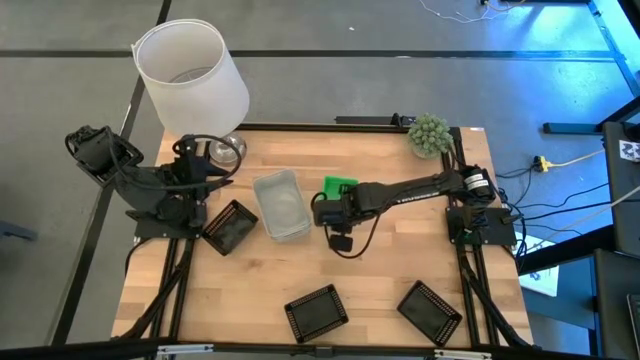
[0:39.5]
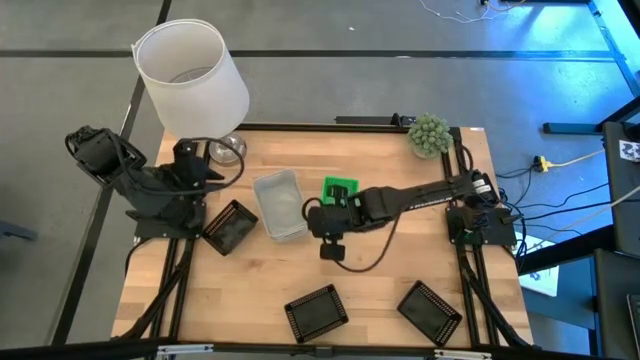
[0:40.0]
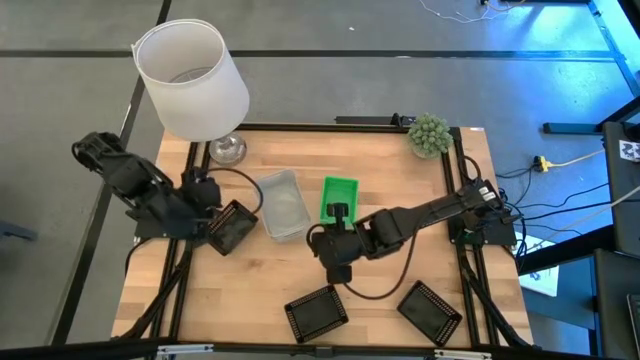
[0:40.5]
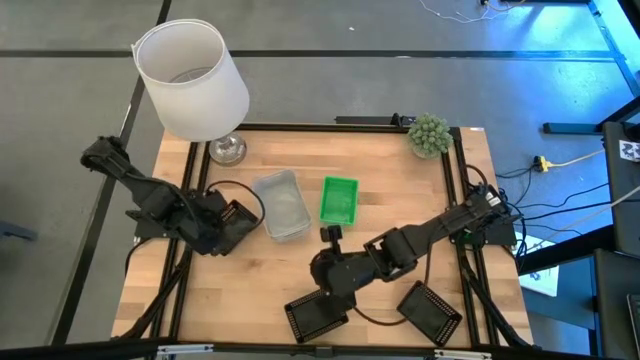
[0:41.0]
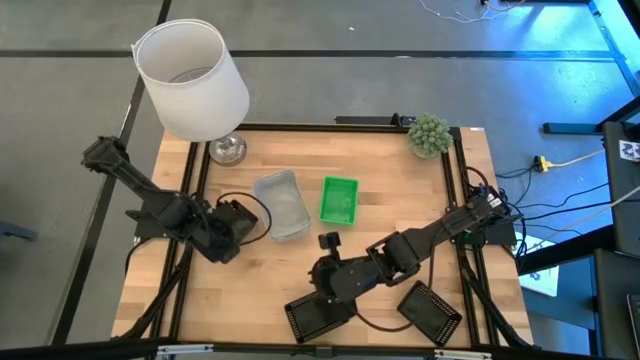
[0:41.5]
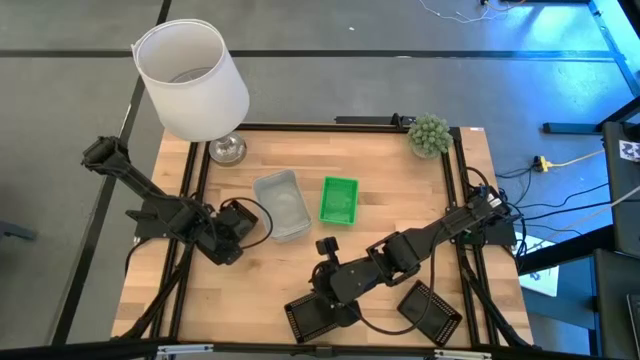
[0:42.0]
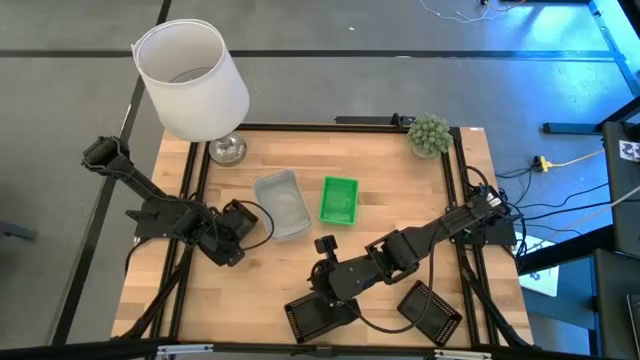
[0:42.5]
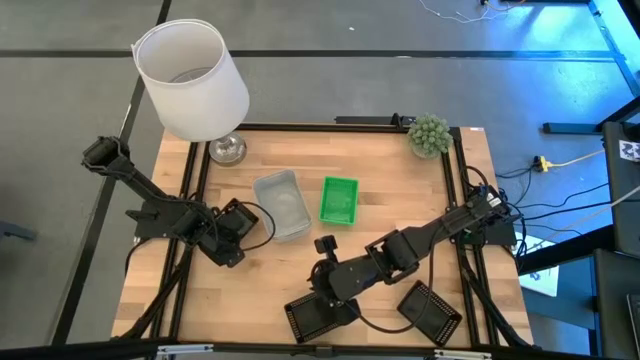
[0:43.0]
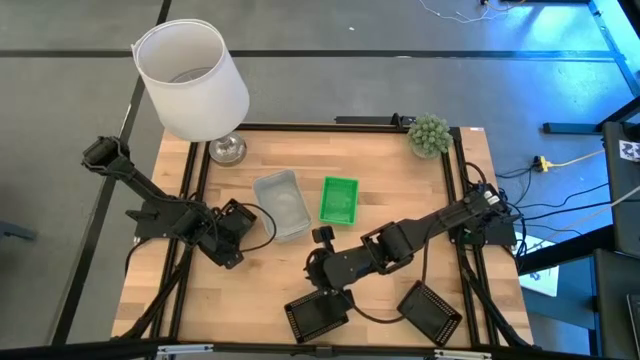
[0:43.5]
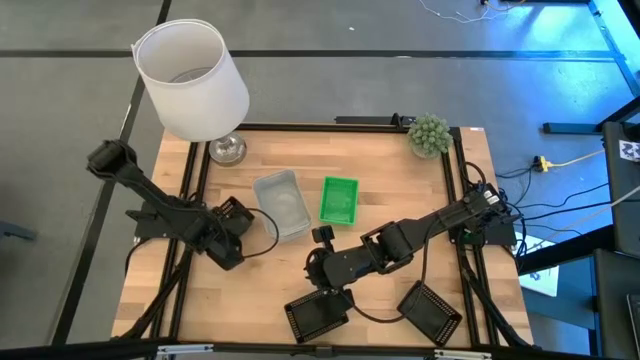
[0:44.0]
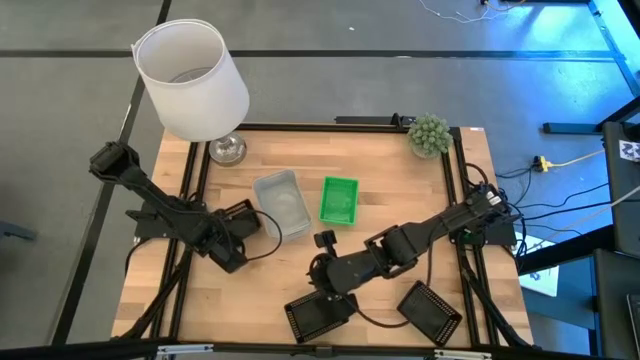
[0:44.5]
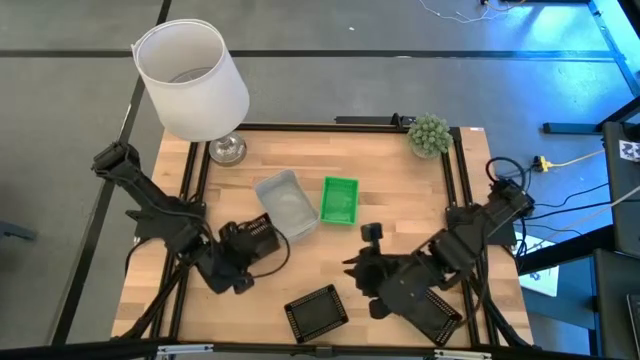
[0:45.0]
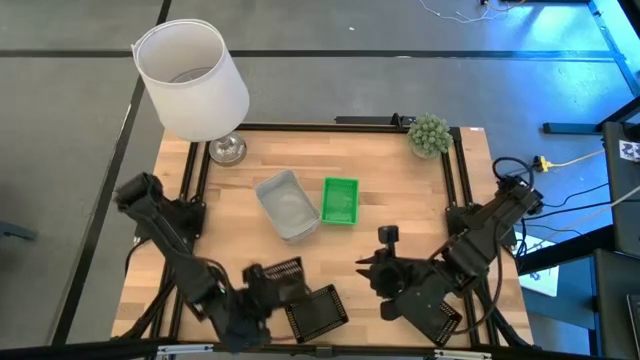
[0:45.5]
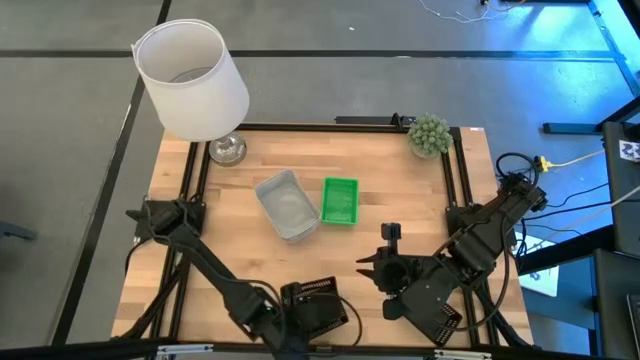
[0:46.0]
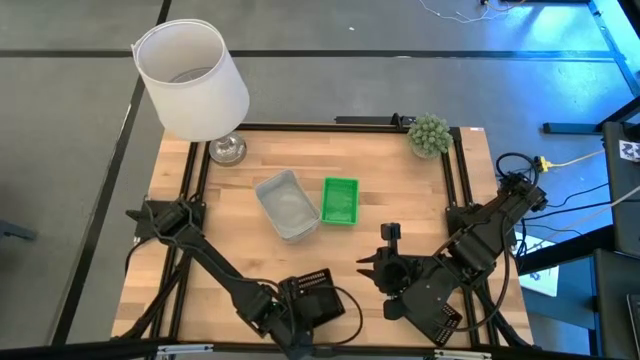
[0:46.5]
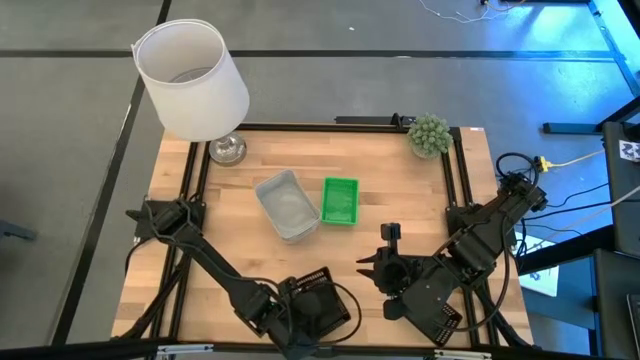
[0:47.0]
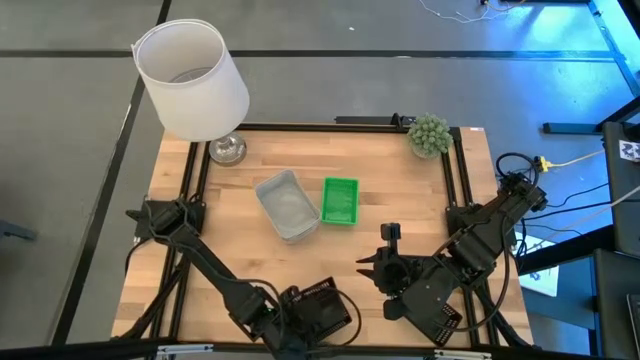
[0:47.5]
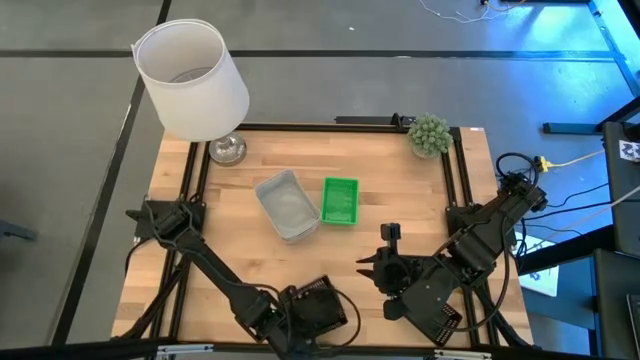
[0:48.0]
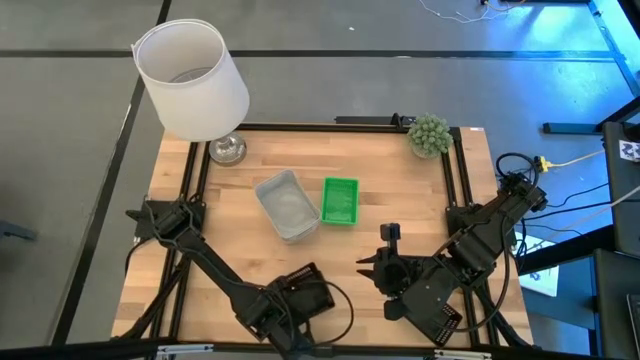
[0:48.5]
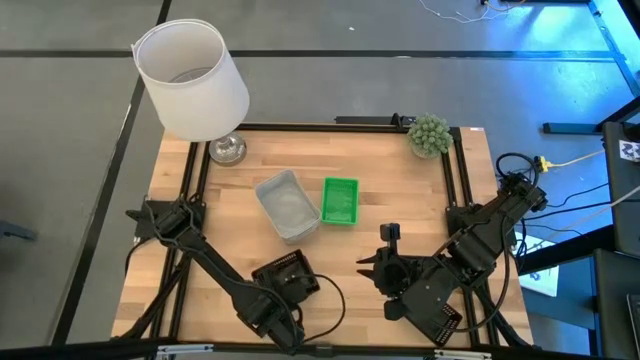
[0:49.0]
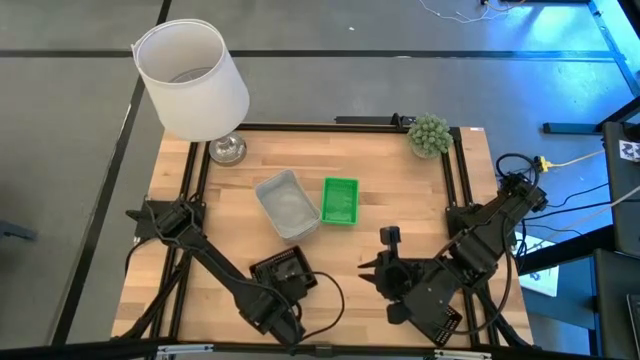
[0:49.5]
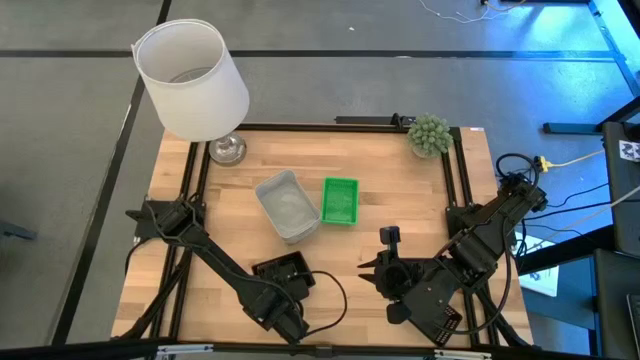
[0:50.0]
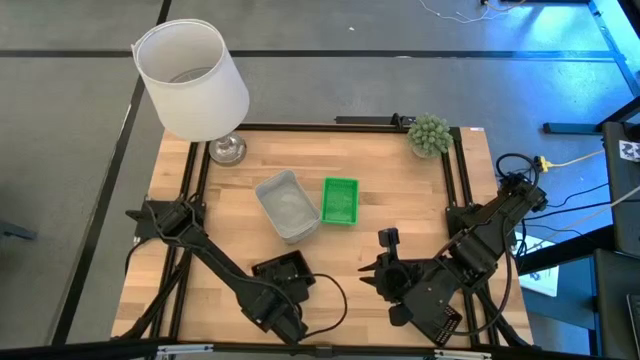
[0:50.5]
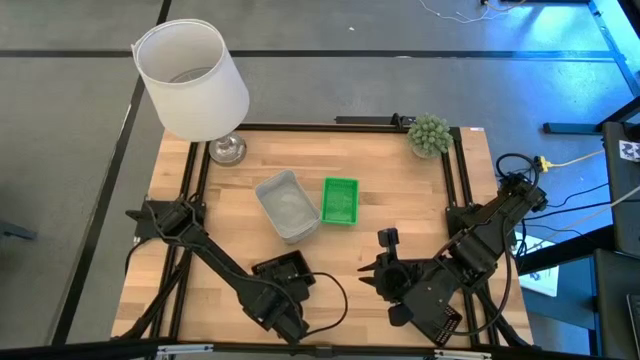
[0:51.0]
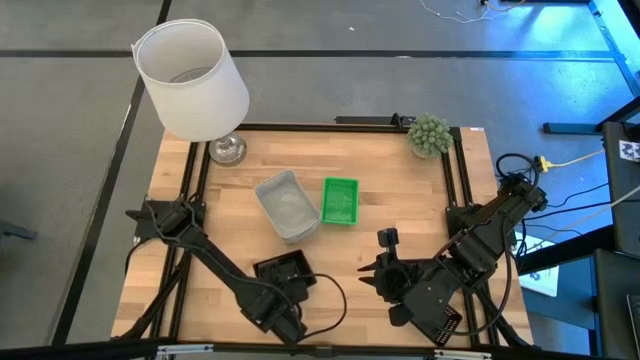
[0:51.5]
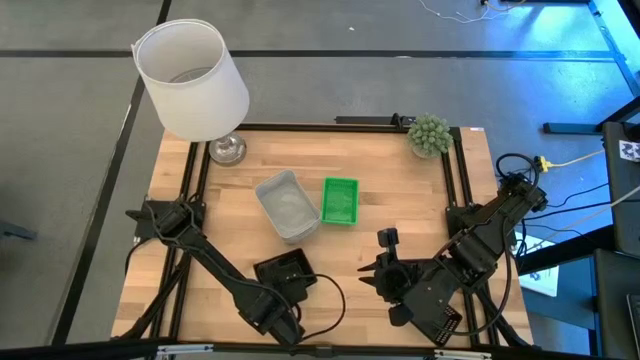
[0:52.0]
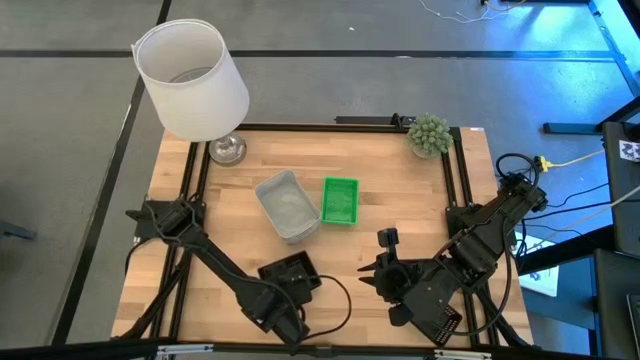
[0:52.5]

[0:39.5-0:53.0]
Stack the top black bin into the bottom left black bin

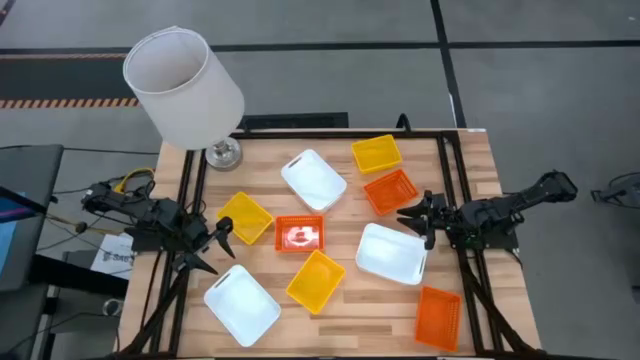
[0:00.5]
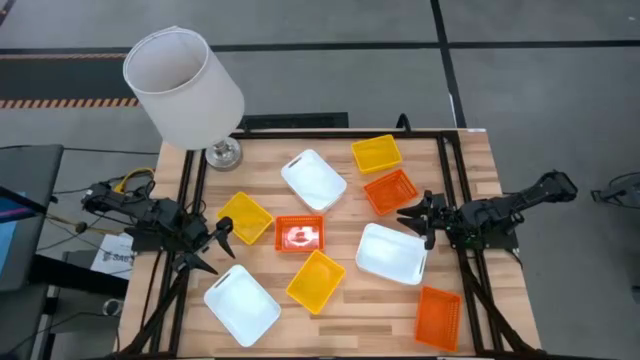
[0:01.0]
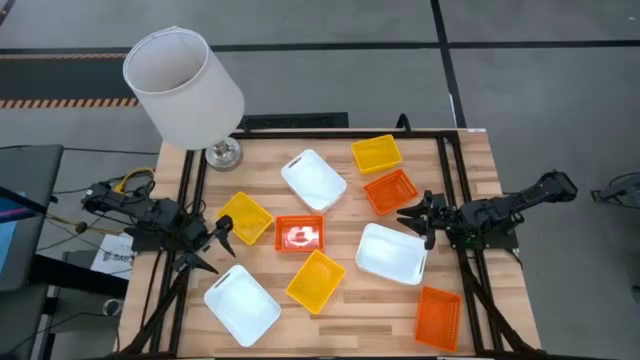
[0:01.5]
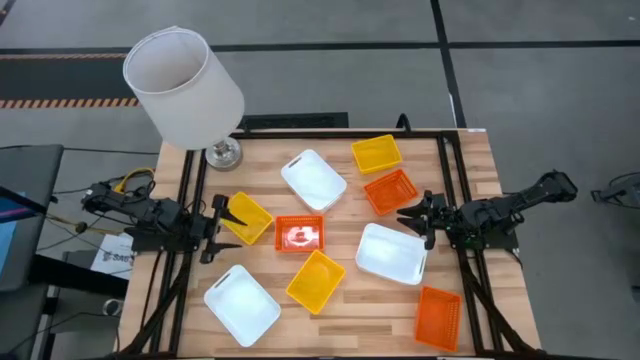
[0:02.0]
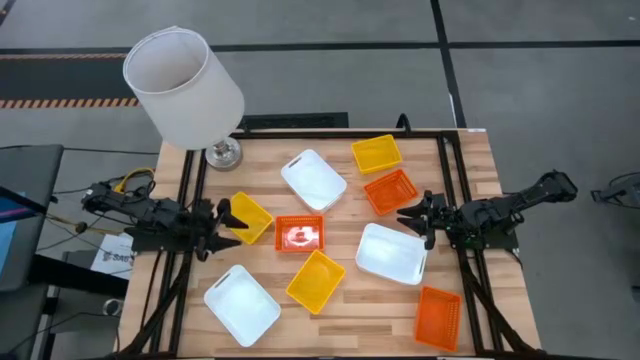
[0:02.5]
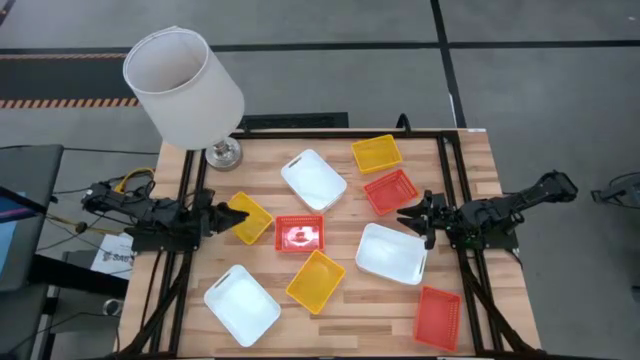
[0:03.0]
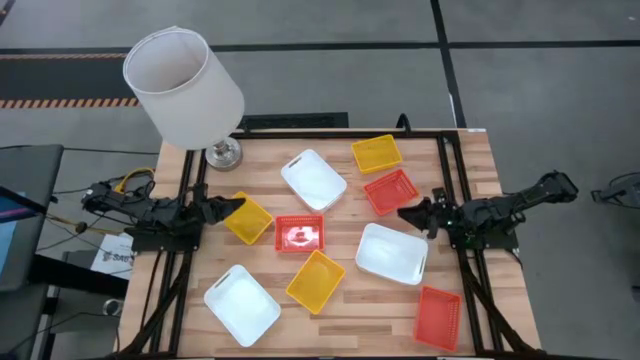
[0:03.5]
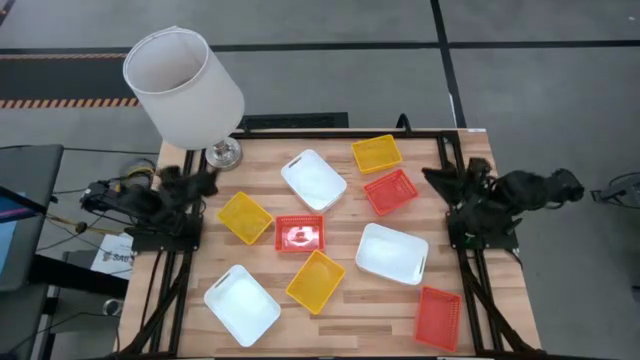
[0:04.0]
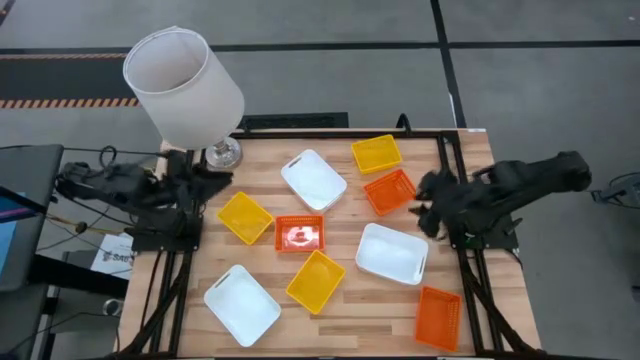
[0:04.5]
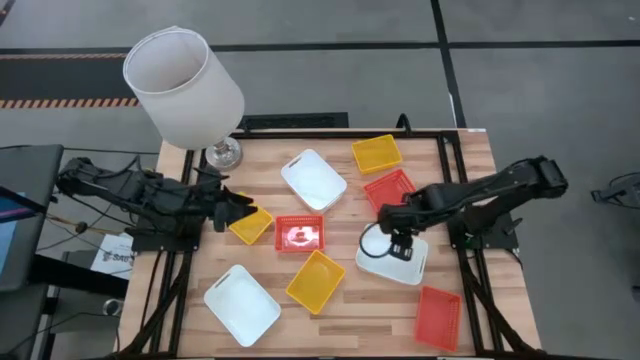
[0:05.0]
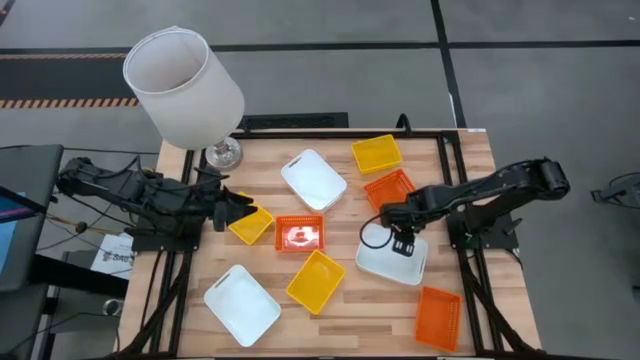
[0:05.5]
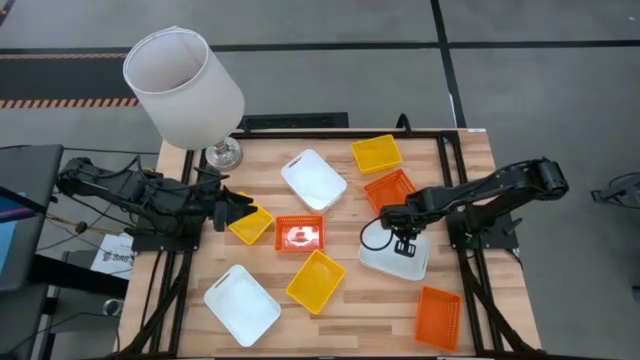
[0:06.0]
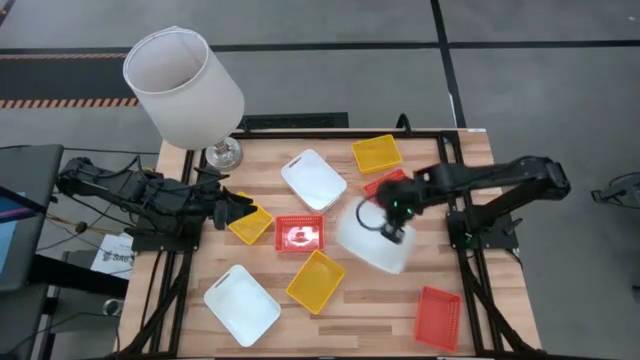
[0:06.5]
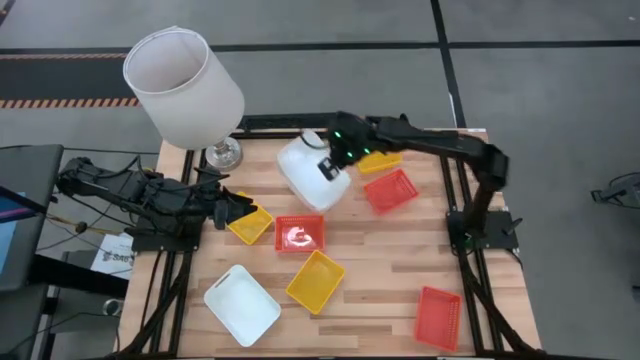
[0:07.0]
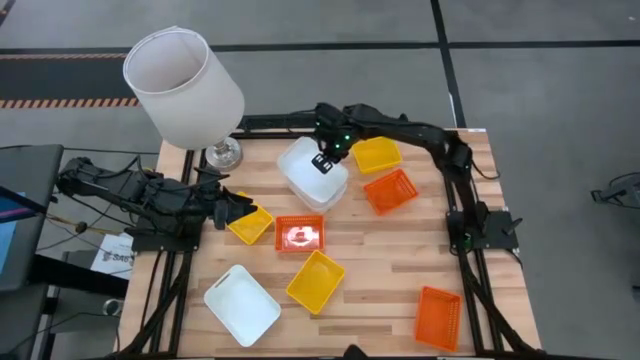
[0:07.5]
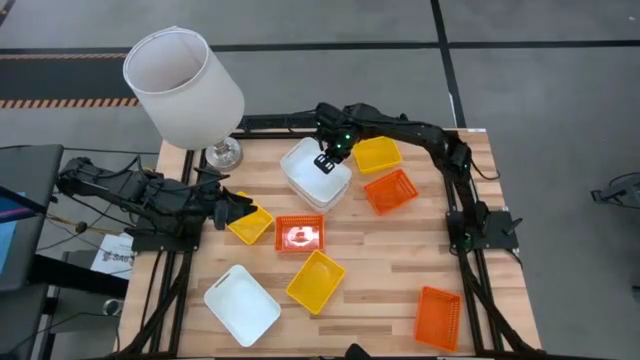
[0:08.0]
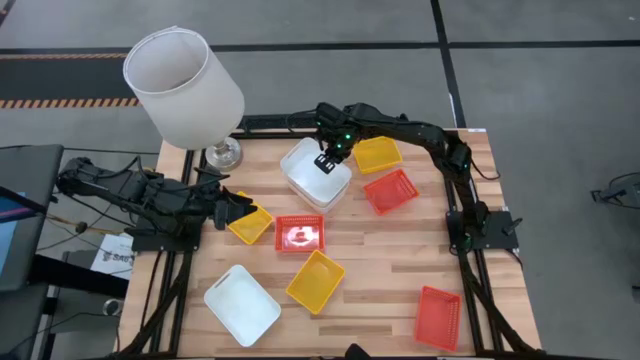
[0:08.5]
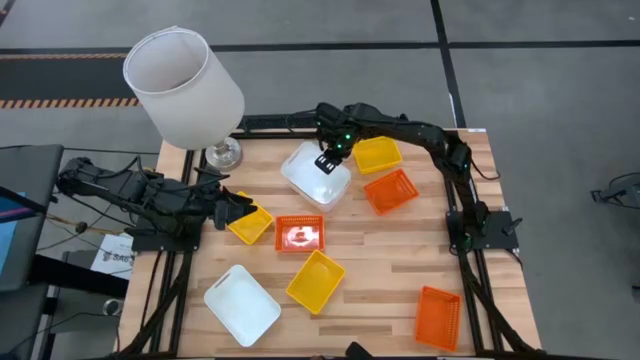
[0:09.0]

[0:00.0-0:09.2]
Stack the right white bin on the top white bin
